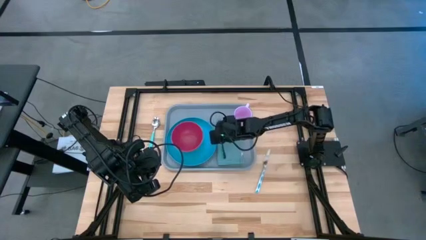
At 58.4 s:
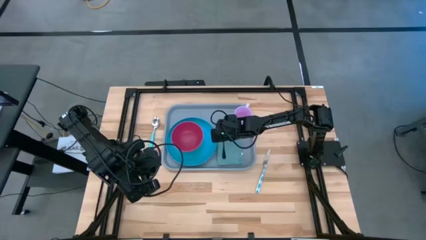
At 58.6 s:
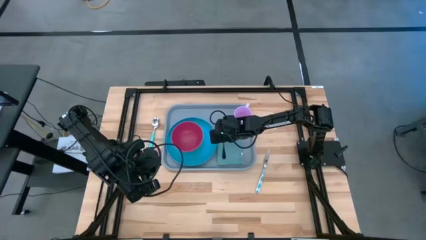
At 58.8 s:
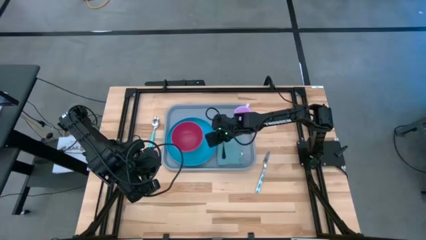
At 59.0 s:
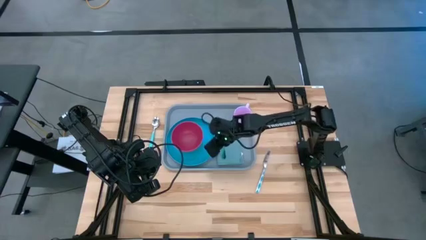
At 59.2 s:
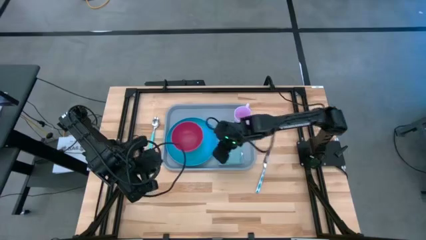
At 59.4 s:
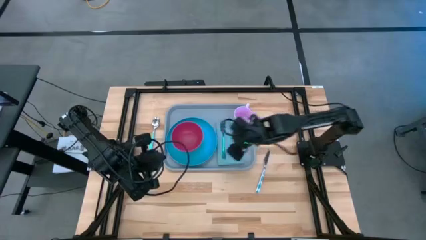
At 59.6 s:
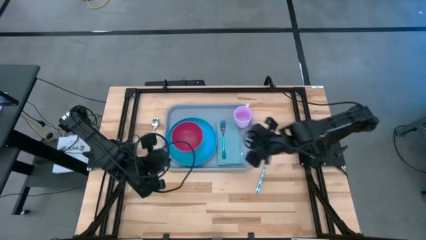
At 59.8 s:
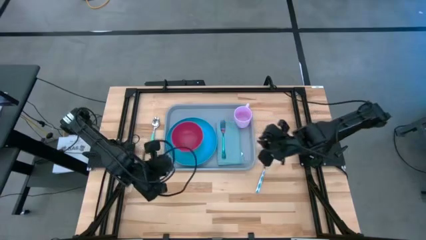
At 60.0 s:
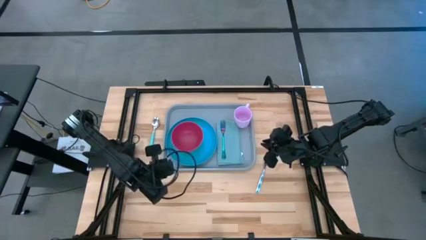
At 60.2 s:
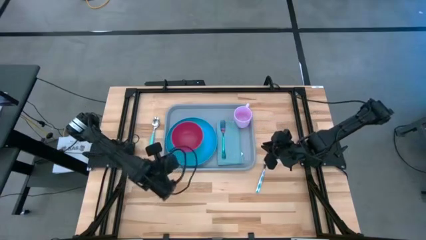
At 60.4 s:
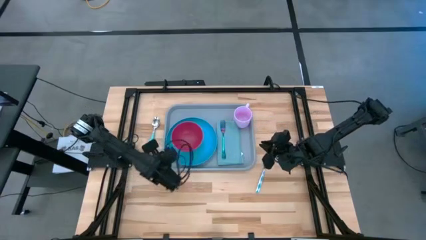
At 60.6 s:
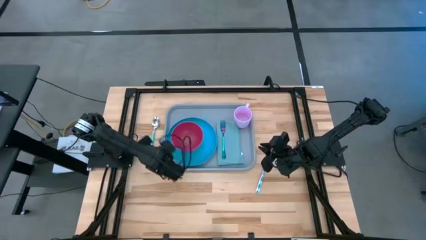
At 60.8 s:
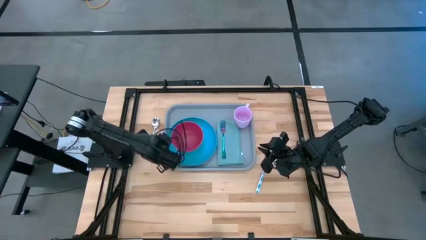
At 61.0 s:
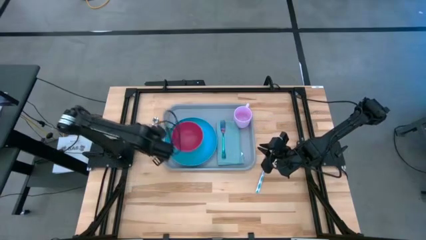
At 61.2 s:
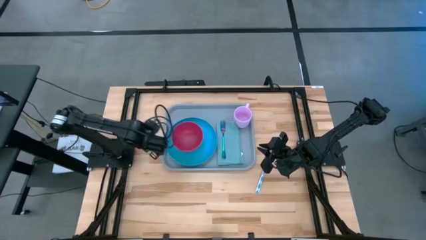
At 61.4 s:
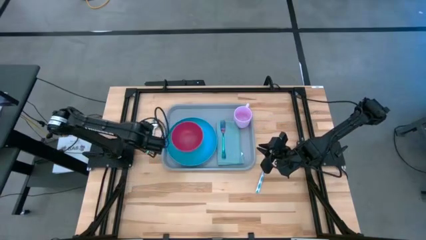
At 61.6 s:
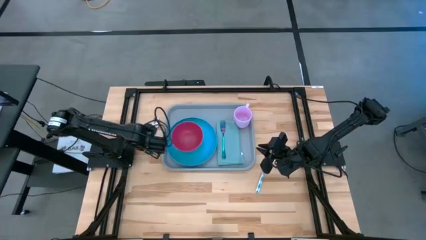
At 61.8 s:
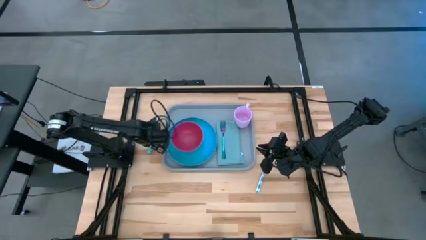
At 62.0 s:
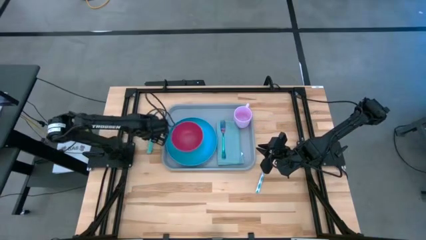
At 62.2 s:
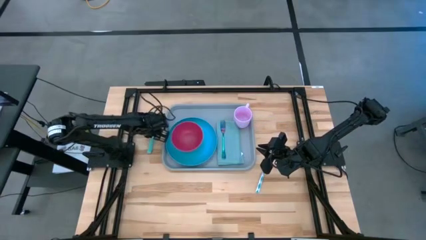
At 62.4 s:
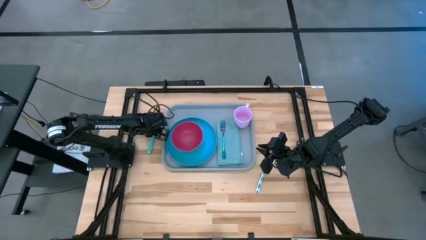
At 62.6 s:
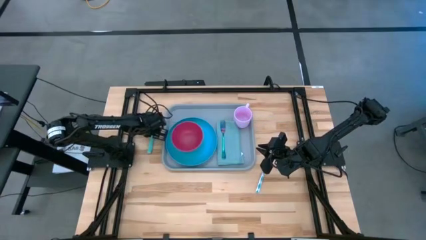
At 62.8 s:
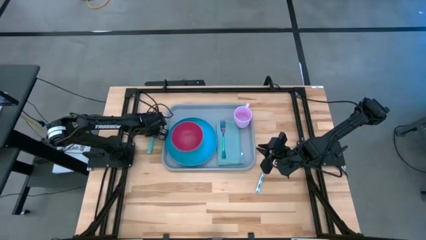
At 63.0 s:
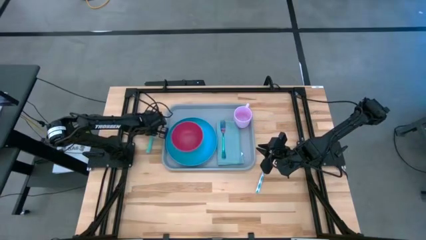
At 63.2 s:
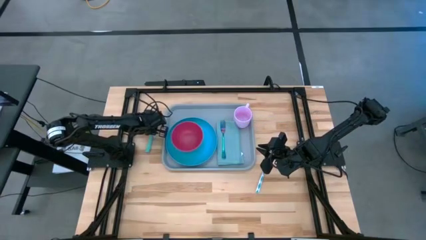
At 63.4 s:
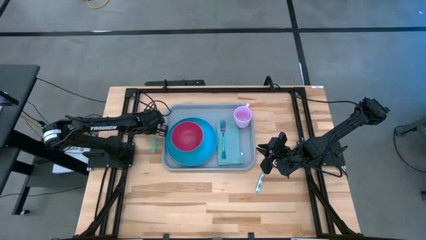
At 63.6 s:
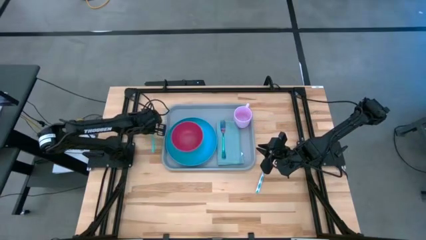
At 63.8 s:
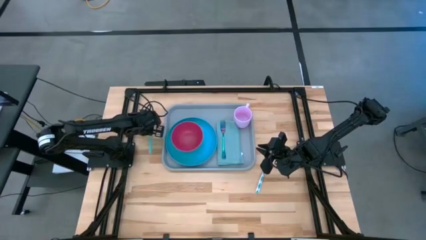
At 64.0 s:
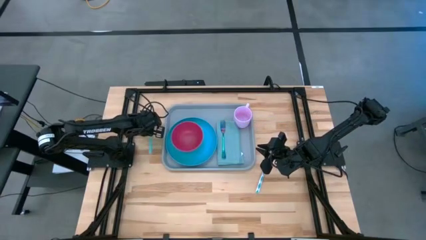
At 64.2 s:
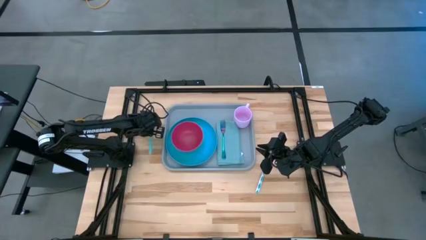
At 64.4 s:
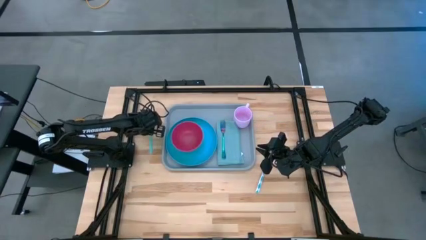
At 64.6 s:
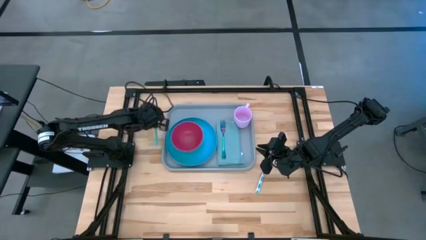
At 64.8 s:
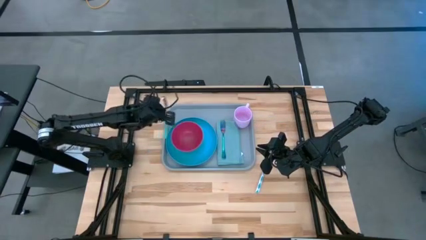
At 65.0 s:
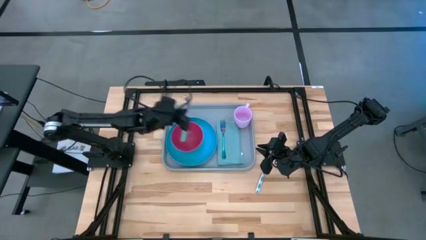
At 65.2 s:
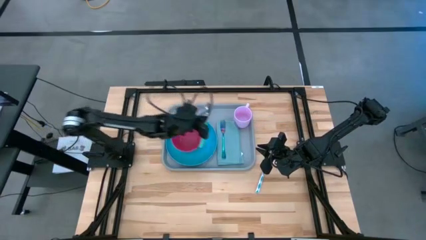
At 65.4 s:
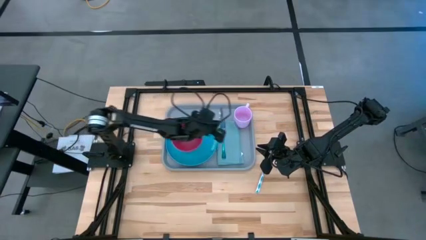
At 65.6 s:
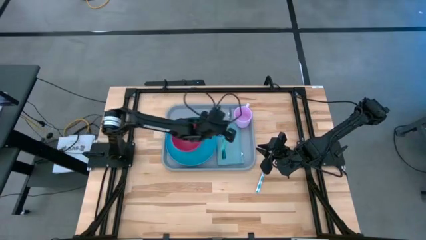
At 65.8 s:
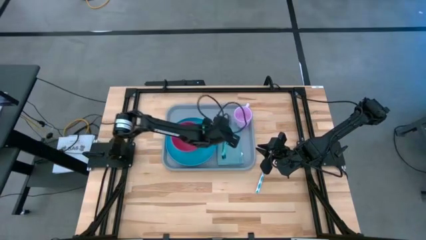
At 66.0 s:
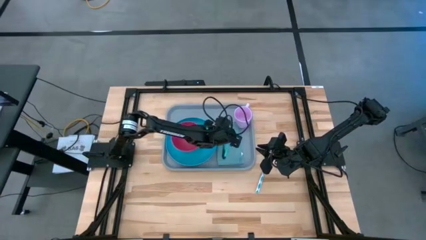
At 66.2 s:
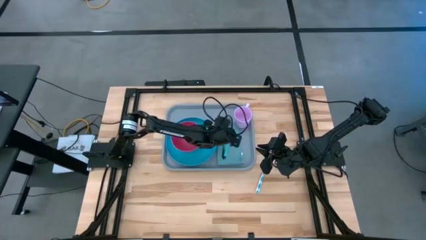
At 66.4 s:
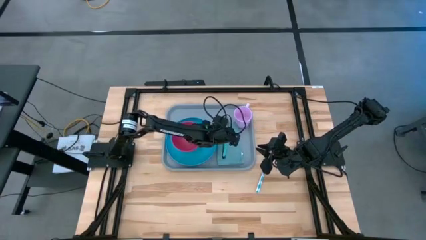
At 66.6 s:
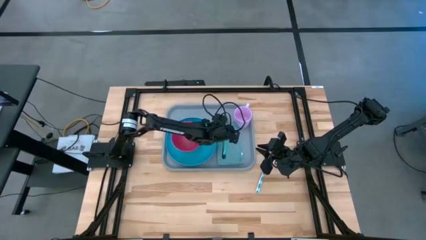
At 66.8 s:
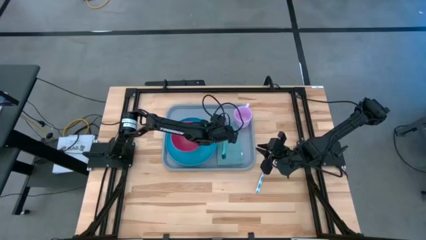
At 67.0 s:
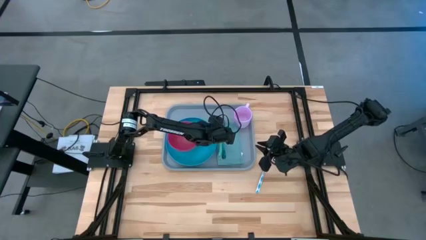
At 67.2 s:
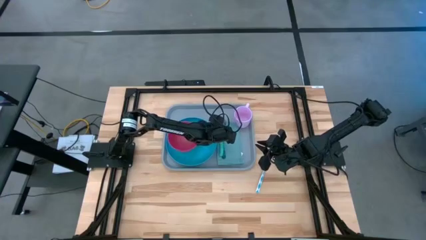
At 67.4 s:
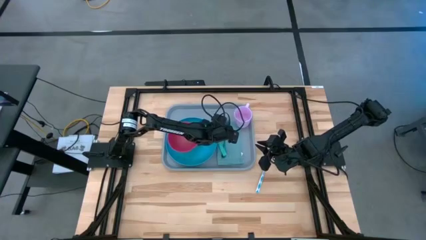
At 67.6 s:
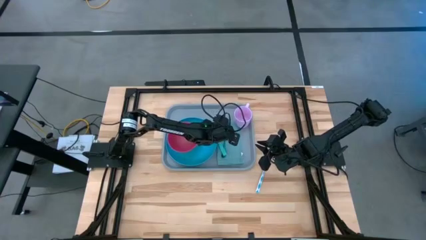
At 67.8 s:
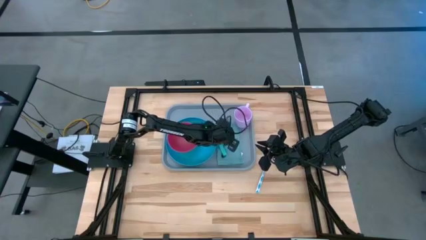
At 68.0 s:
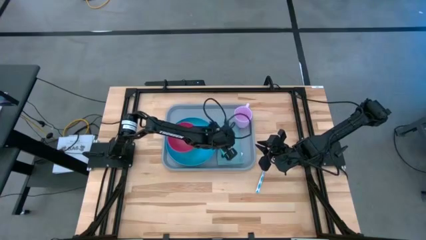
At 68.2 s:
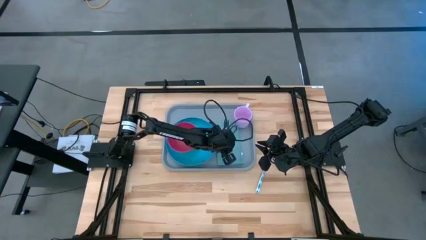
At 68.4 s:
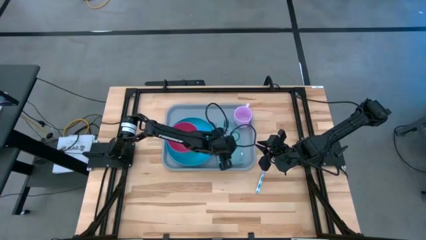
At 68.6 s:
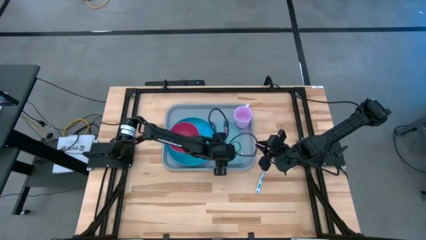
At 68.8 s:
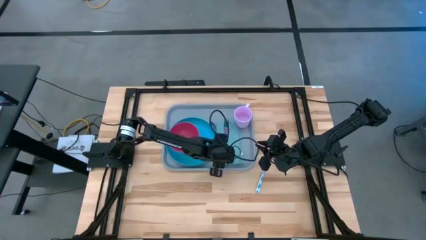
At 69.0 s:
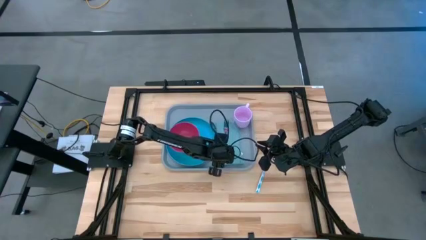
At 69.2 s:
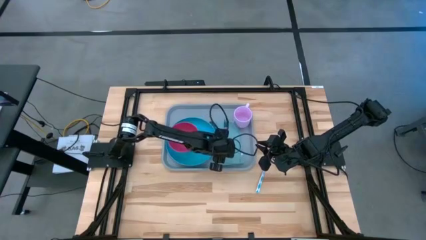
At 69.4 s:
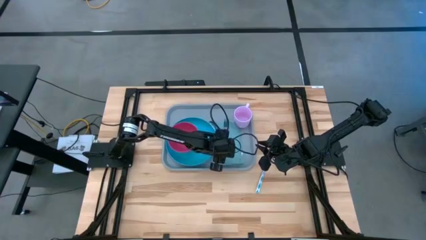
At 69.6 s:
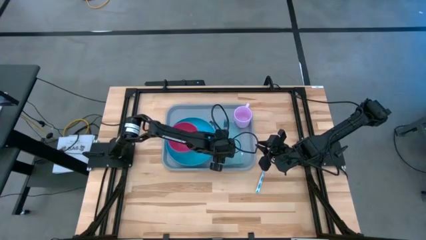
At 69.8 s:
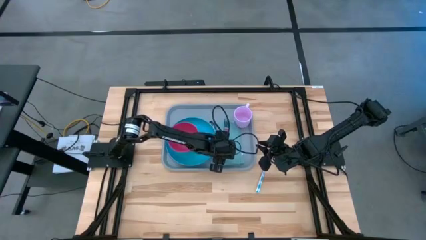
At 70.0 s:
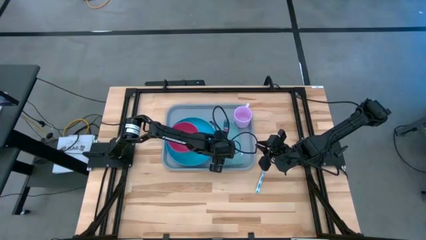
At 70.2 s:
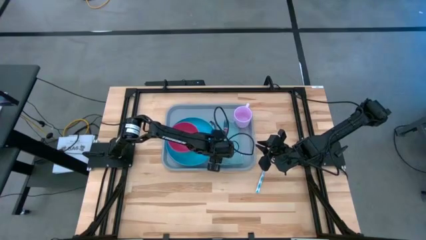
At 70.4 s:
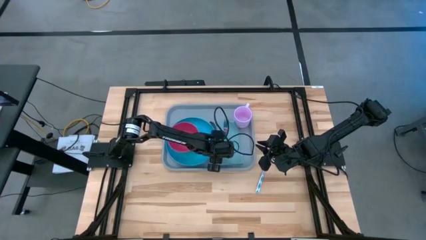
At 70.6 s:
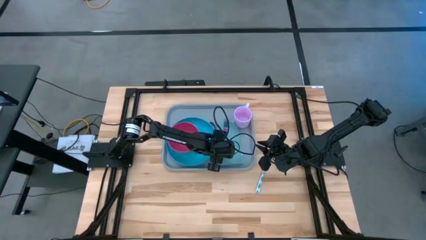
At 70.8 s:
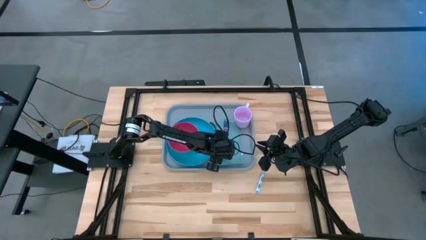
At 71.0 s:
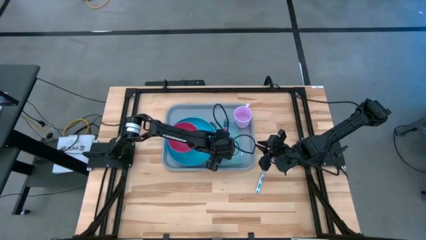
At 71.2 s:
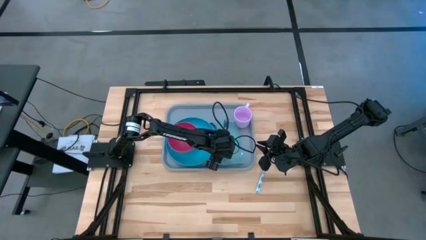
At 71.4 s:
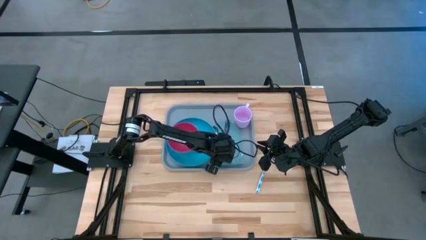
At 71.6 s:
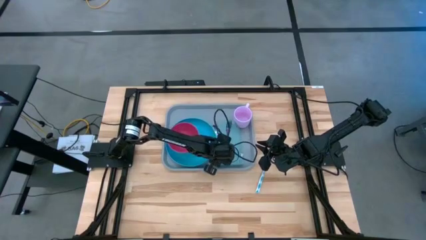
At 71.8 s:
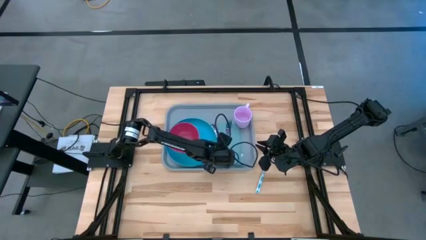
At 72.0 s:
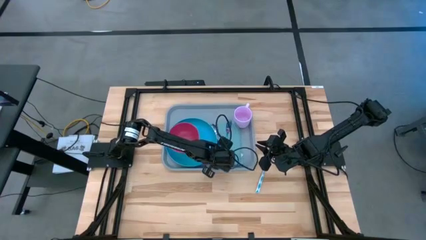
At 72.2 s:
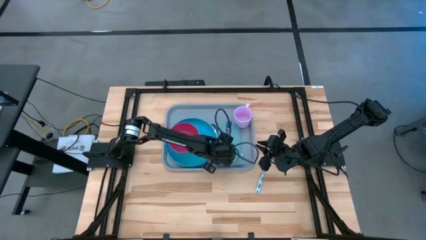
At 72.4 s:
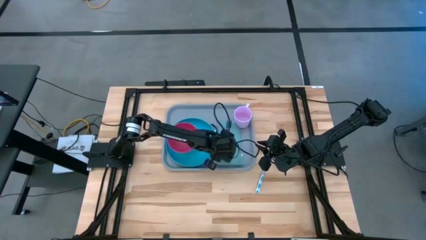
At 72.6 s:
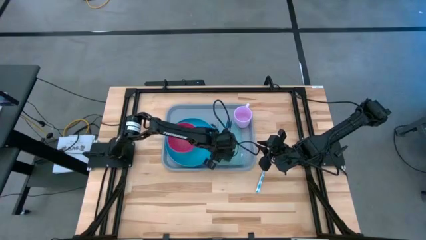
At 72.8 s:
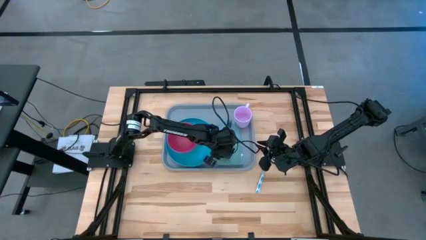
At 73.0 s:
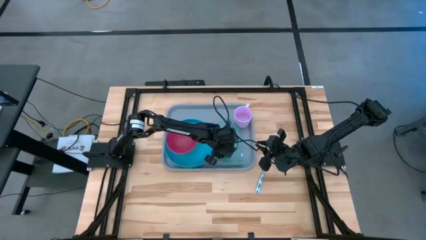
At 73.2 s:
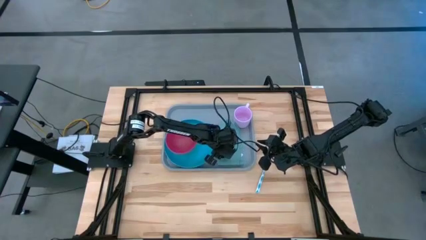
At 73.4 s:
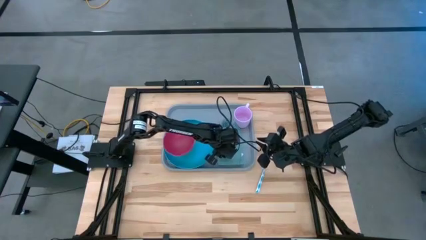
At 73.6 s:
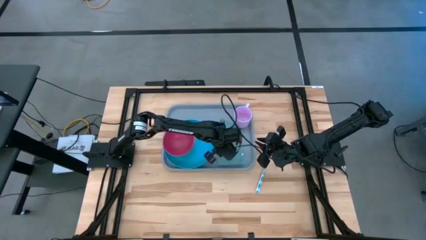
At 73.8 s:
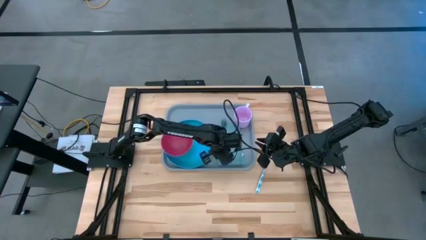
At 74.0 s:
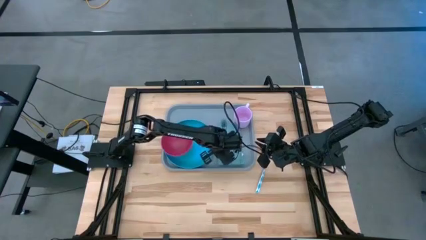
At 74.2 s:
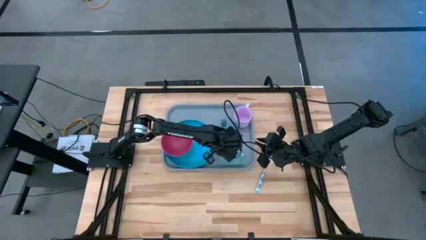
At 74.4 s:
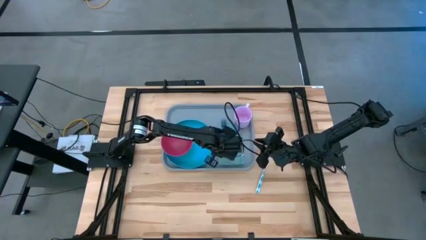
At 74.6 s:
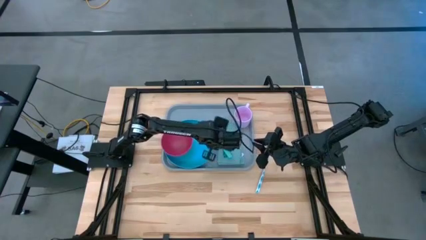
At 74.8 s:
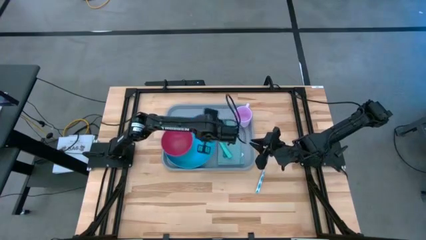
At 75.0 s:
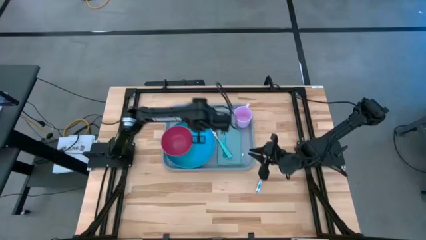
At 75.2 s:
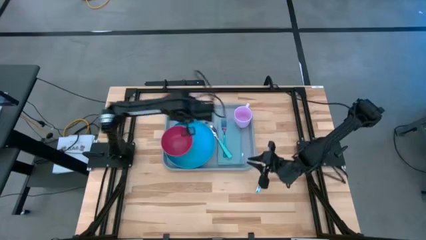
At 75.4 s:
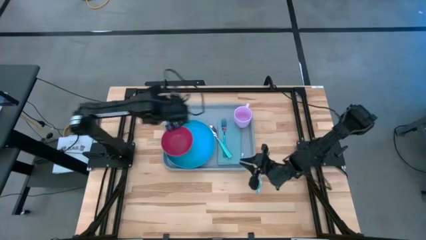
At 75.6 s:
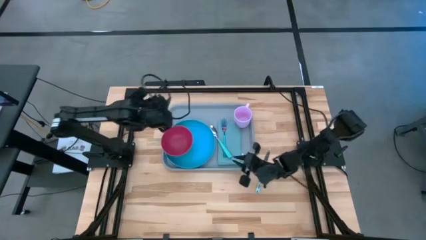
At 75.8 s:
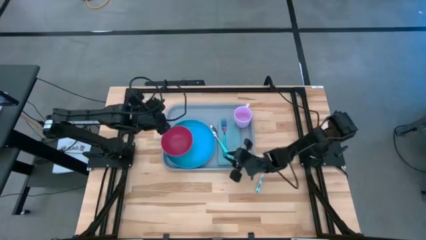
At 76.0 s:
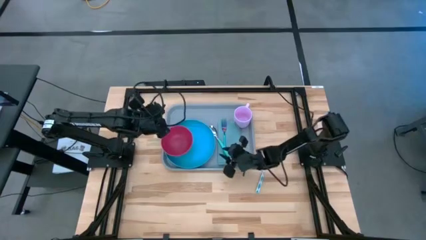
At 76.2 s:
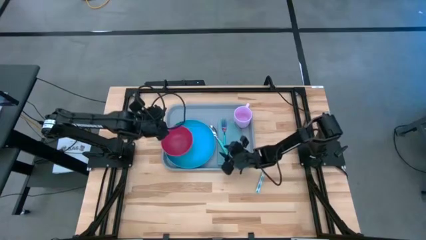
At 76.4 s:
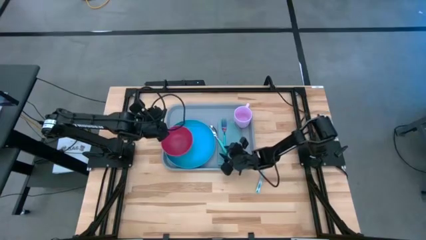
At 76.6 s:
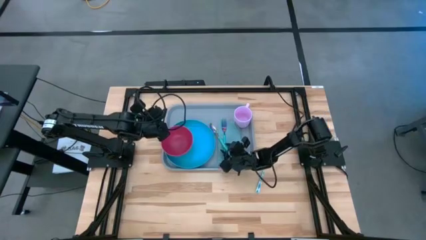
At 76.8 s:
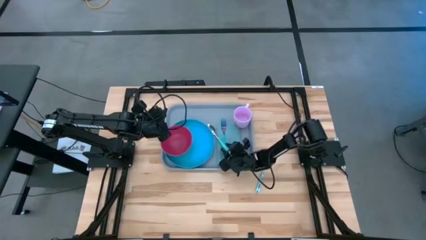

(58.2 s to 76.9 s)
Task: Set up tray
Put the blue spoon on the napkin to the right of the purple fork
